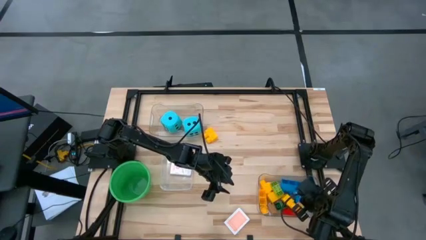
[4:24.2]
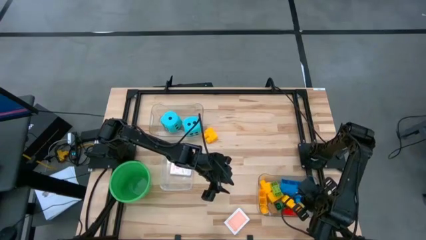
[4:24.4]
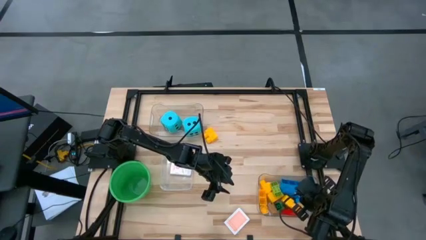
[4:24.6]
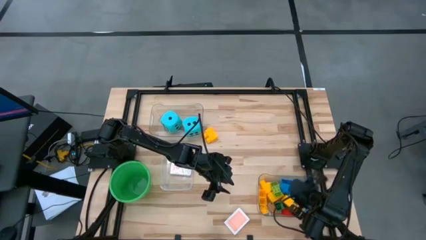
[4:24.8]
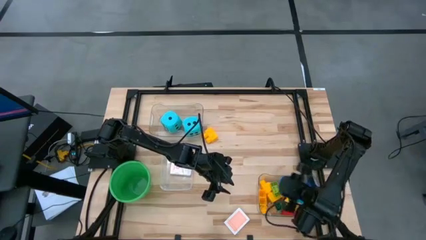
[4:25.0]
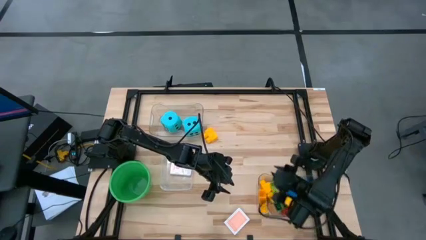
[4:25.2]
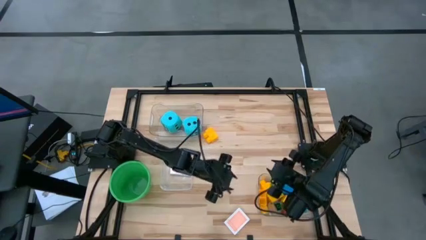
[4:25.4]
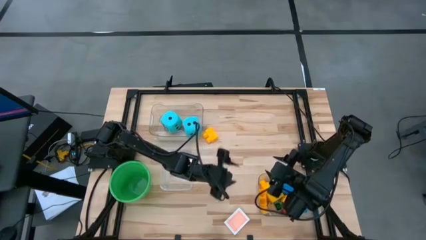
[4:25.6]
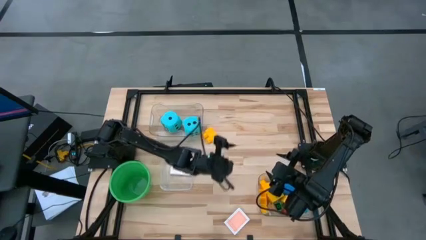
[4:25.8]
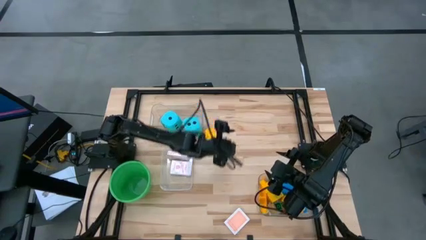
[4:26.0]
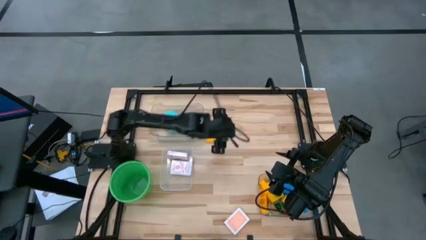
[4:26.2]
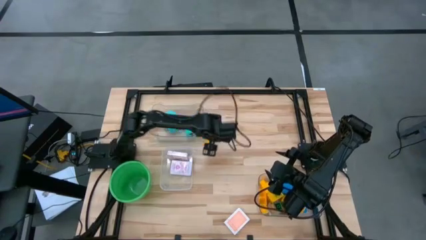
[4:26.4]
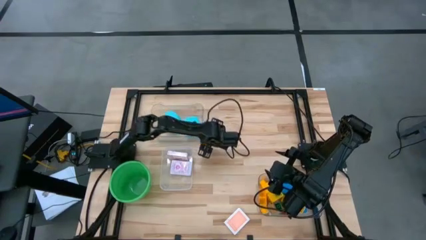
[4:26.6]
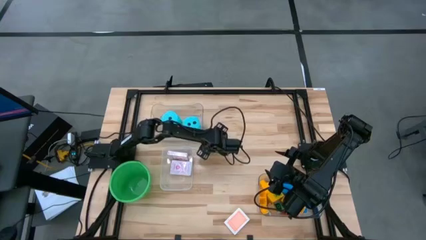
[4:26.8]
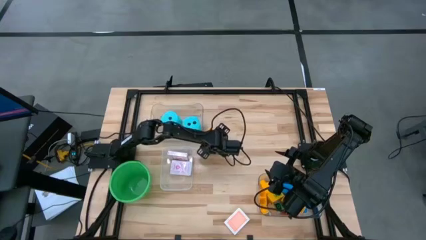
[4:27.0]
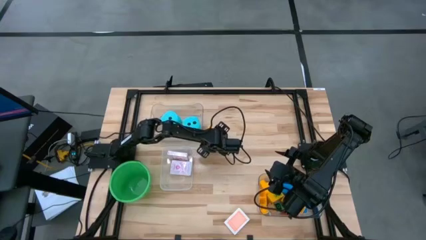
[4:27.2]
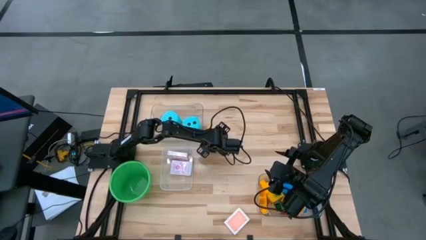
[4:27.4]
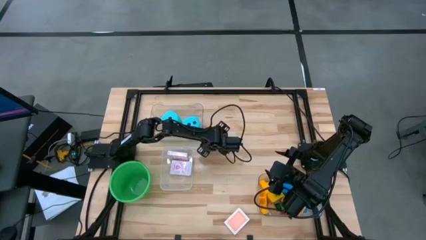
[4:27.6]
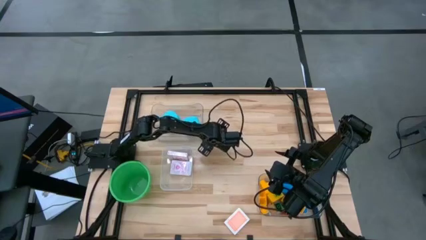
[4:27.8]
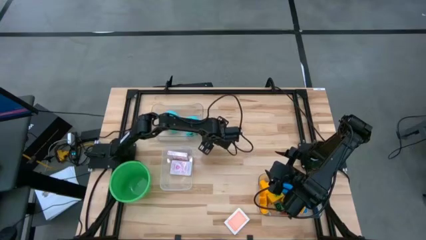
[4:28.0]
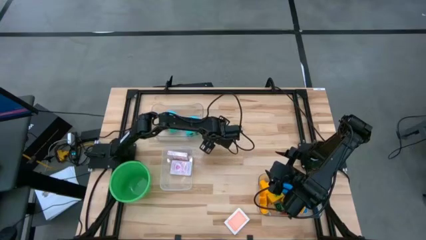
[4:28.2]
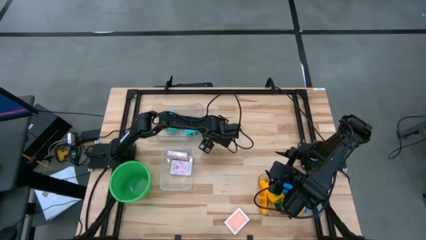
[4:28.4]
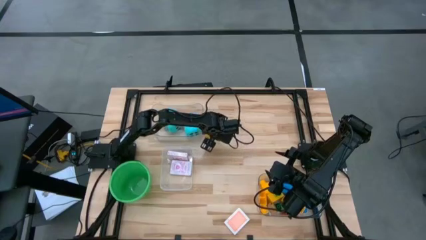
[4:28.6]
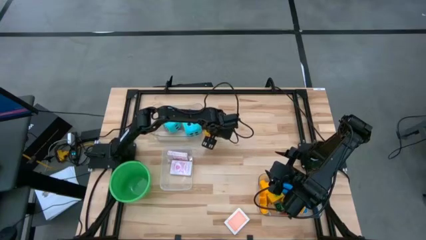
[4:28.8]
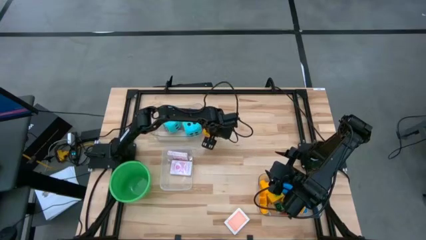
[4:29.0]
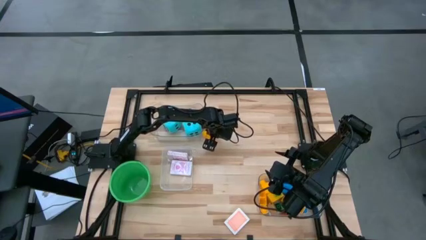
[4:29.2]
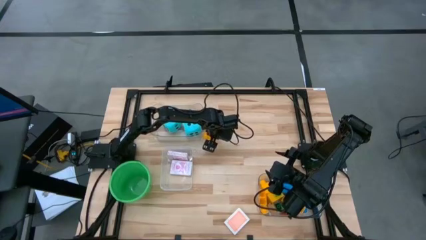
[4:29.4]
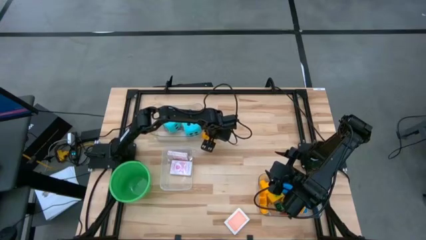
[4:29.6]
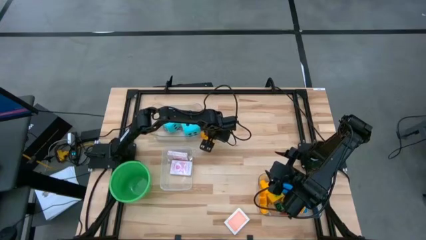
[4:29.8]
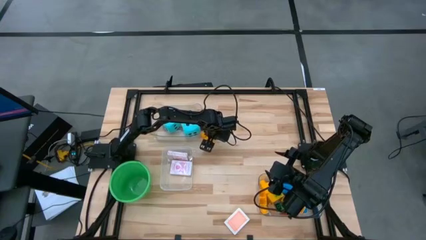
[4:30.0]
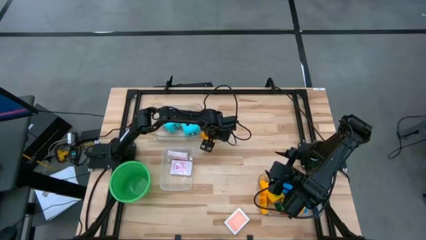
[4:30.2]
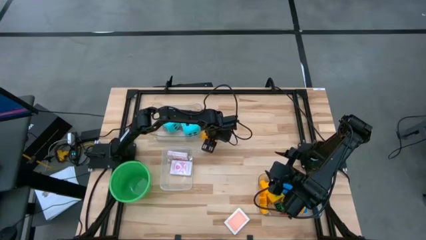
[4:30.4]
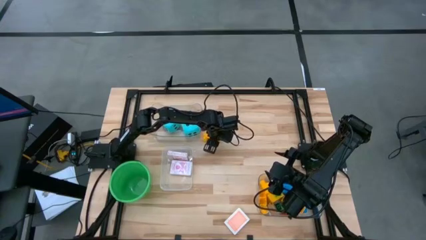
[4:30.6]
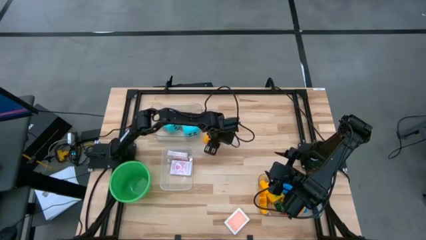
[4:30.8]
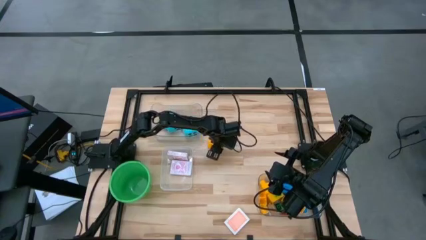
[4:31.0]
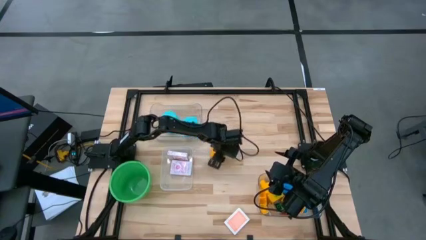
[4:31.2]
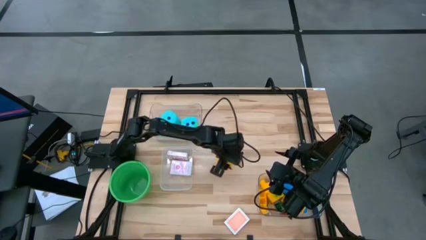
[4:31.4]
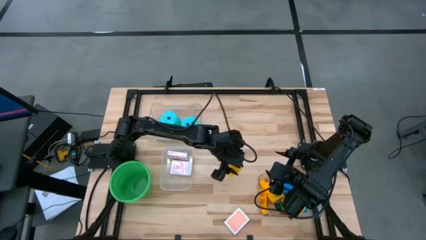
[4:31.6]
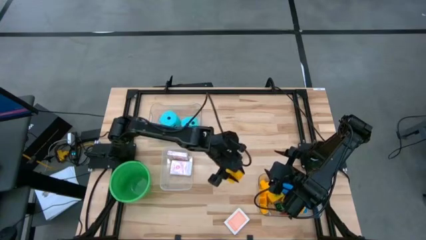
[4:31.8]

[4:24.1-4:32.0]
Task: Pick & Place Toys
Put the yellow game piece into the bottom right transparent bin

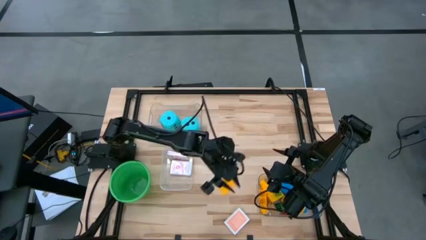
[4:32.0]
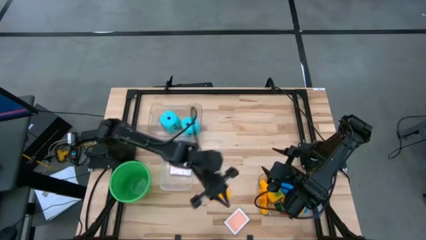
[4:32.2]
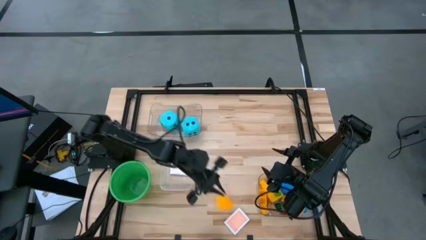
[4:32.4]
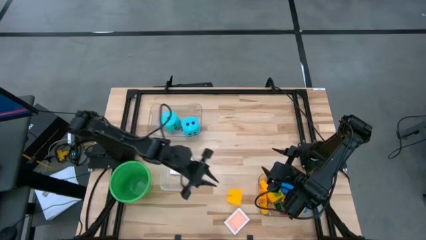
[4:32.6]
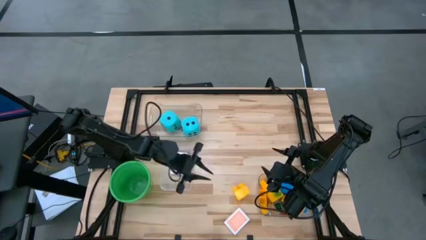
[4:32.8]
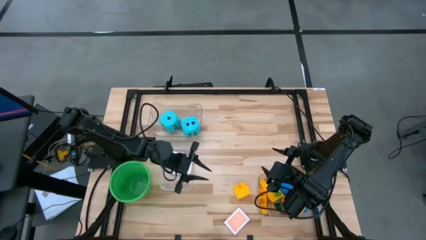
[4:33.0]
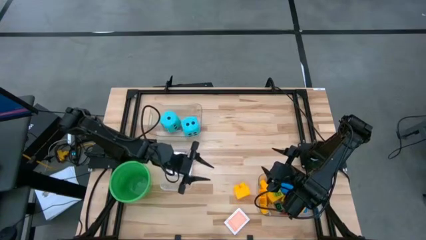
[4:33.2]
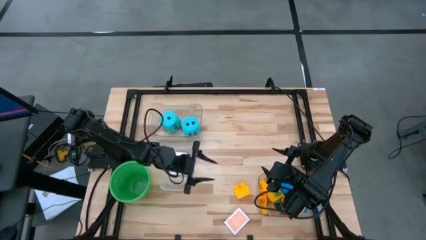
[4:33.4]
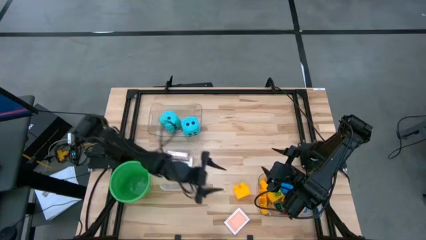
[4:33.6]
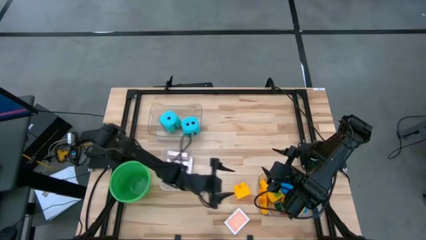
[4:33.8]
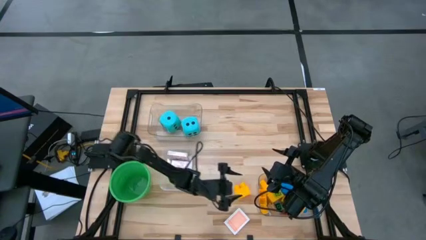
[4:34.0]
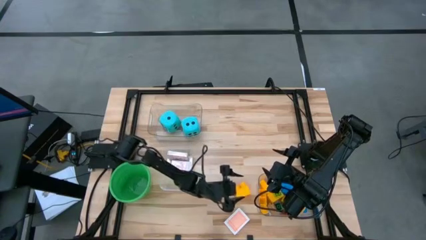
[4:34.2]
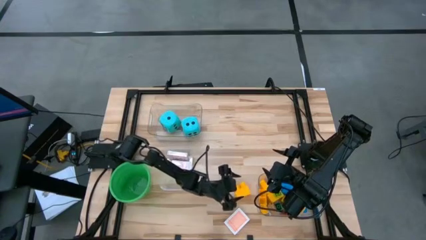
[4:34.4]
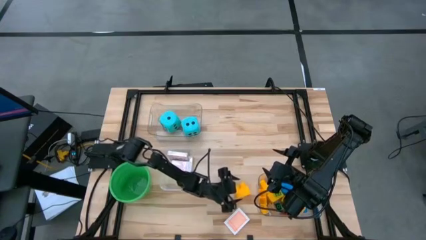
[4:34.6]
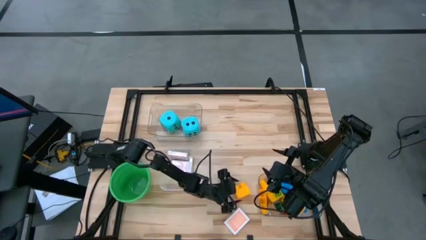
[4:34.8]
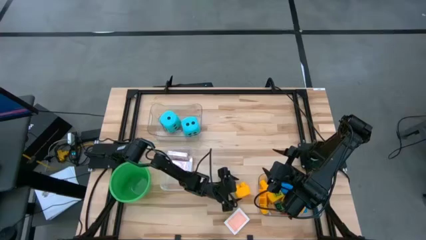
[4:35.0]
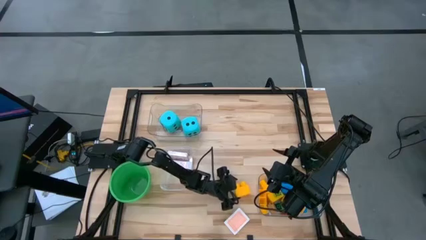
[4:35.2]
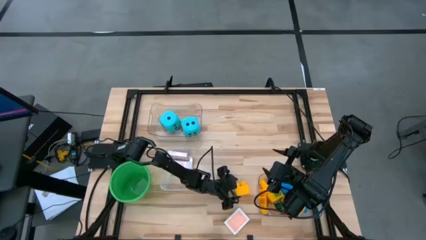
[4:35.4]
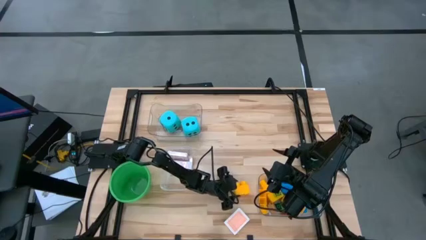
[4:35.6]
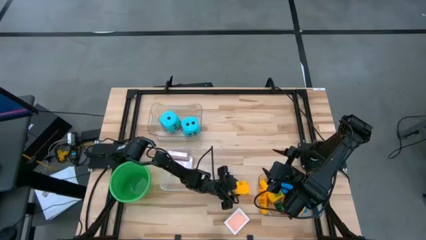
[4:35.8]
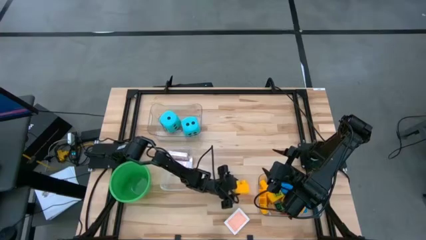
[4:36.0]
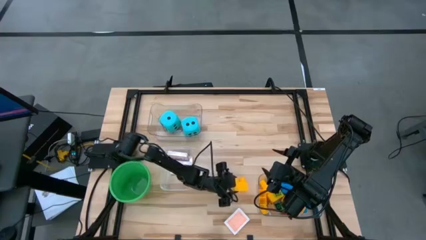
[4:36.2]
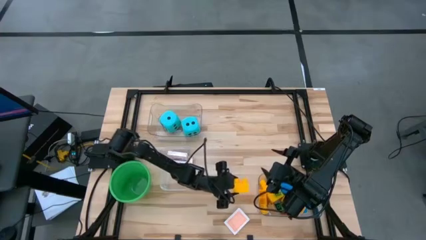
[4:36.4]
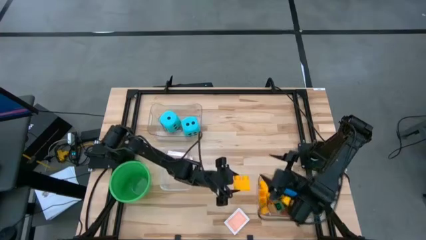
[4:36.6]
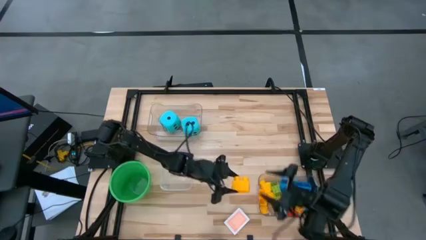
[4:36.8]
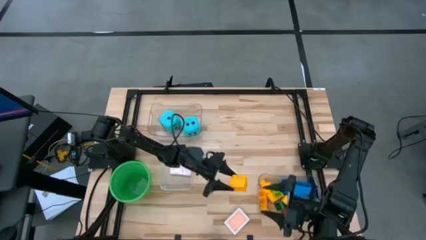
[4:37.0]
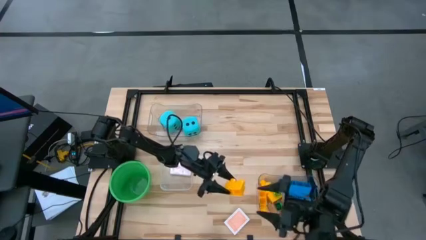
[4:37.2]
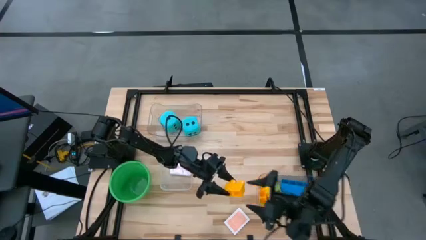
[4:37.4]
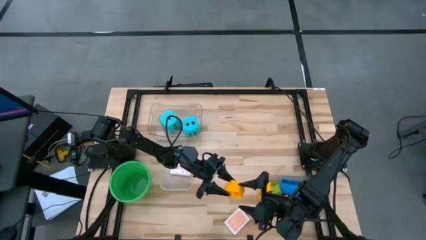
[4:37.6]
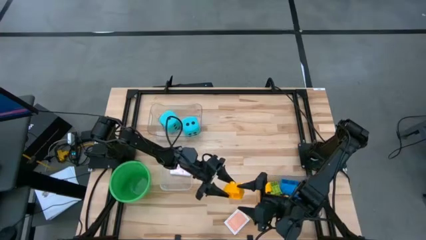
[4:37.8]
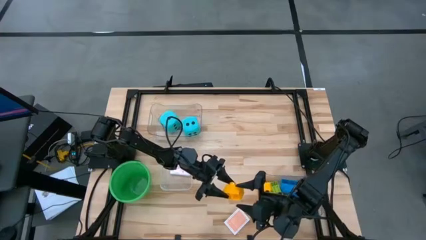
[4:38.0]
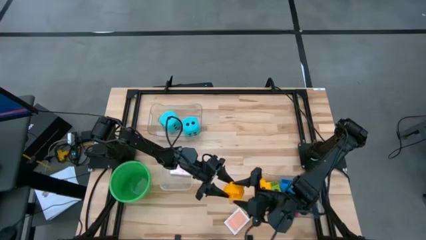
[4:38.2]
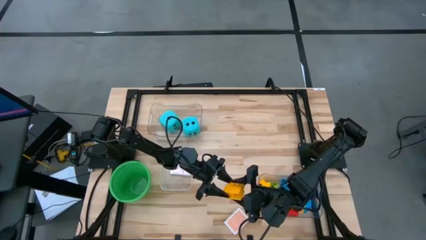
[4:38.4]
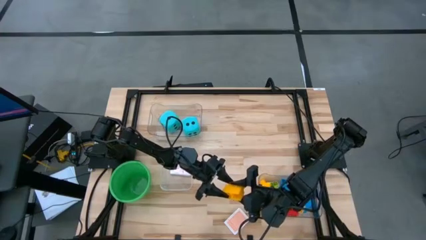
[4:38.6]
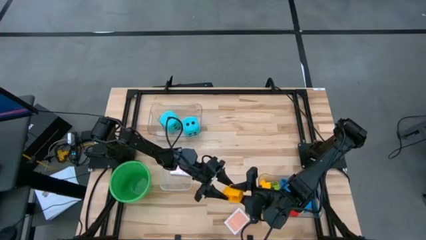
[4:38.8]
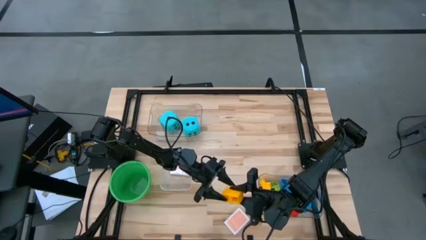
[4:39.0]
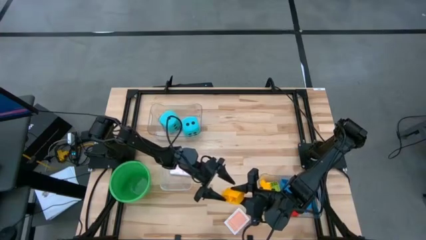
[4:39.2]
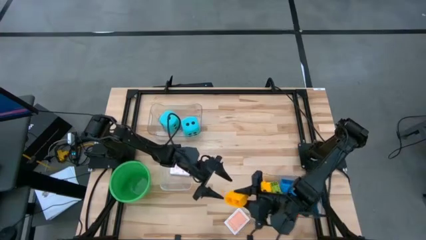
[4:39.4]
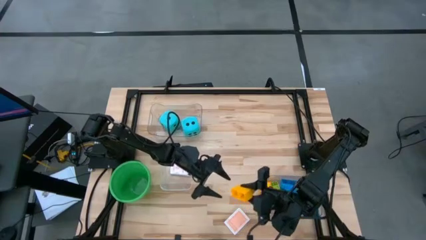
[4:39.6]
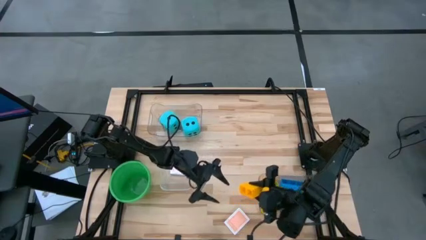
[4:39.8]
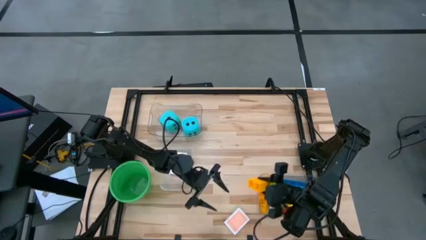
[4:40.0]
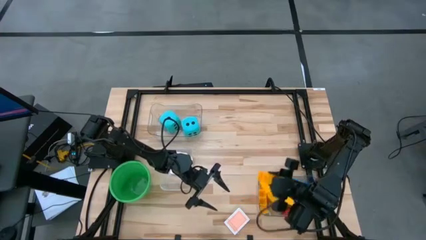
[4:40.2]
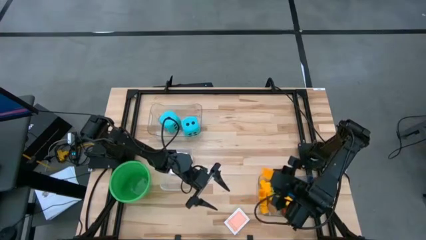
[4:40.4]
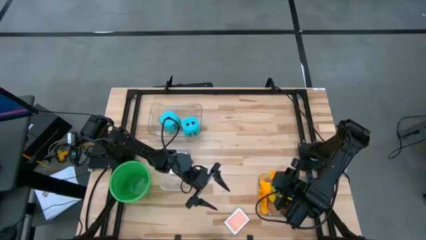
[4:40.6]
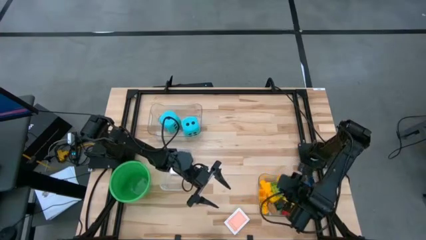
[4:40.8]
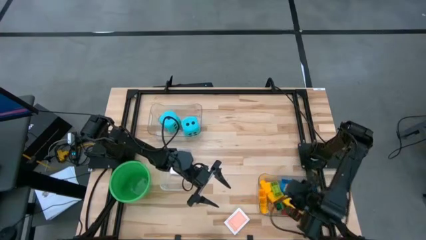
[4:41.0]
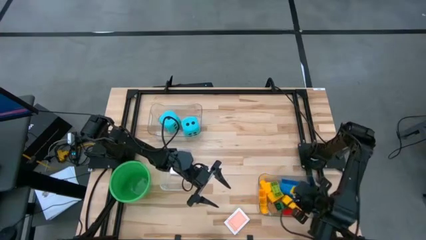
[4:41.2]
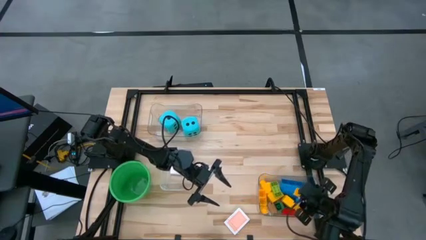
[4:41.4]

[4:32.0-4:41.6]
Put the yellow game piece into the bottom right transparent bin
